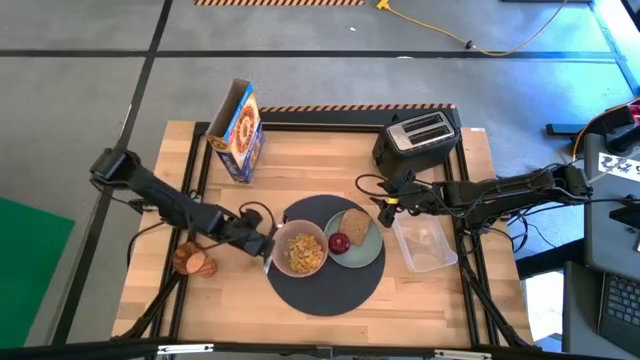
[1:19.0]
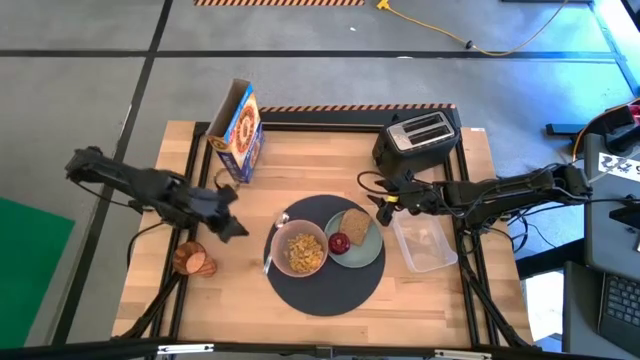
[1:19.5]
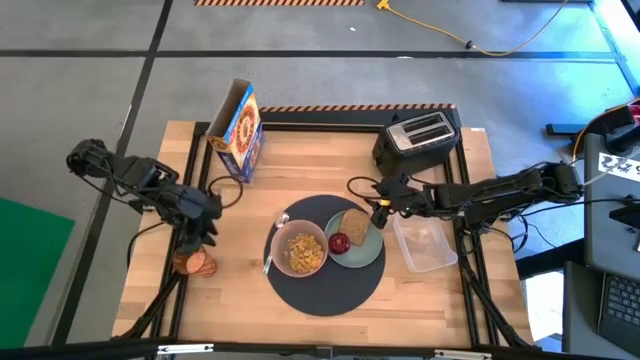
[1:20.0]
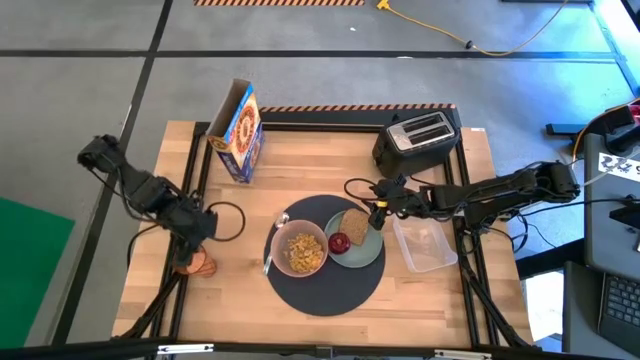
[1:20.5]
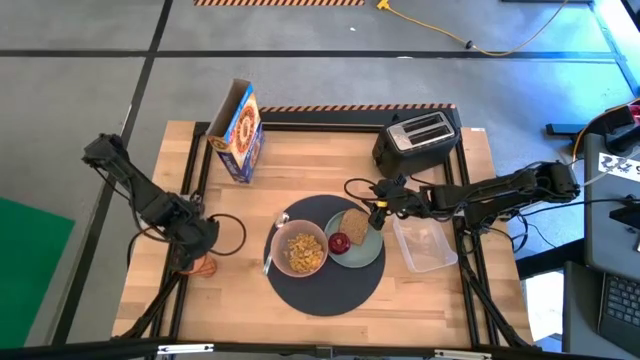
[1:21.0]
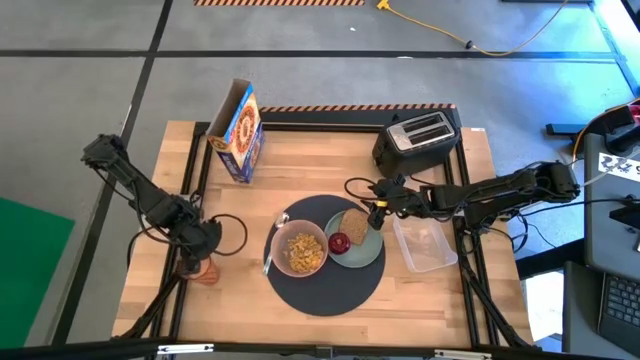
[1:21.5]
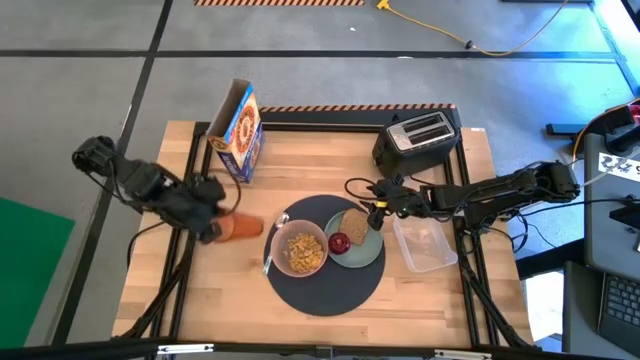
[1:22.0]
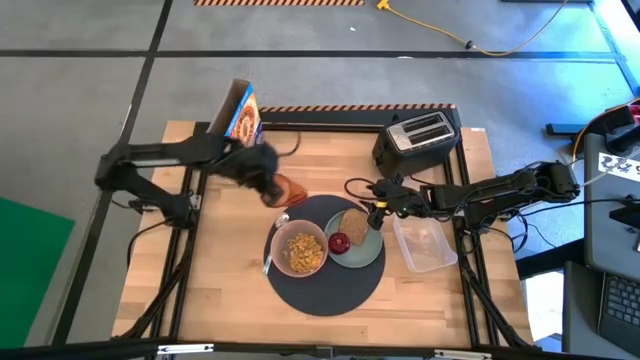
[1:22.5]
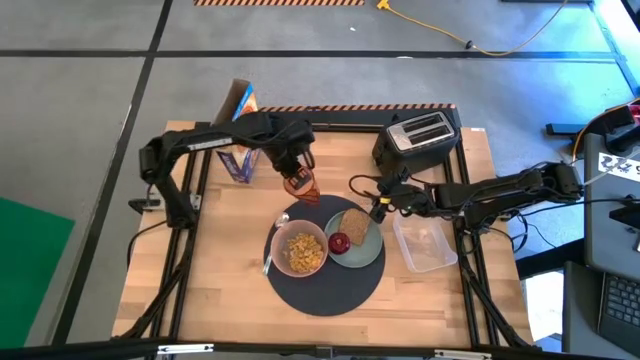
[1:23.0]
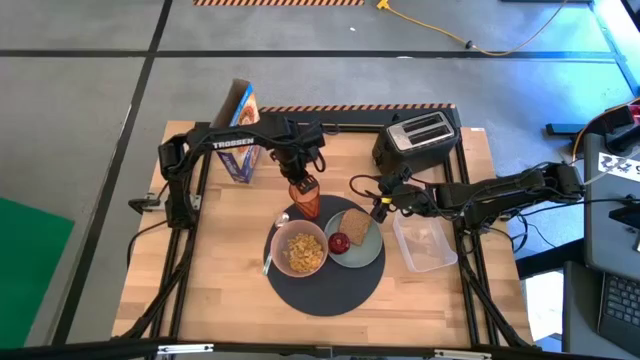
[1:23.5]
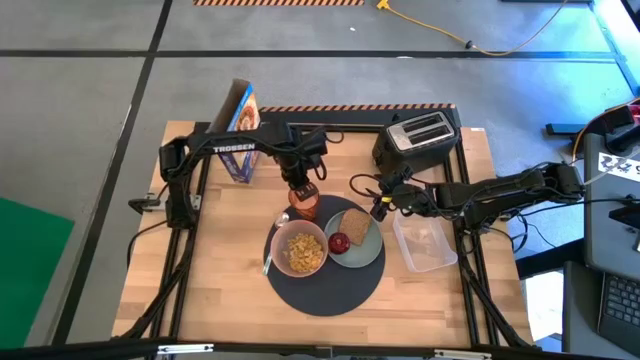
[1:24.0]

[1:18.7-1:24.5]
Task: Arrange a breakfast setting
Put the orange cup on the blue placemat to the top of the orange bowl

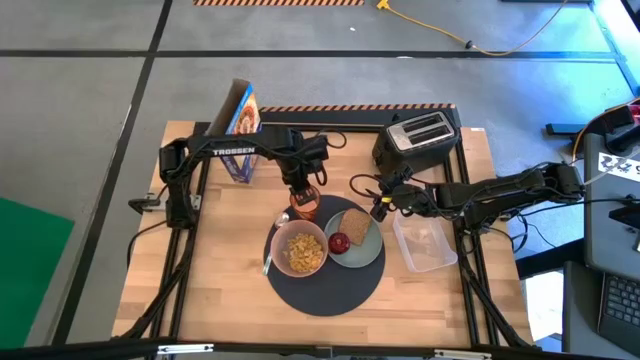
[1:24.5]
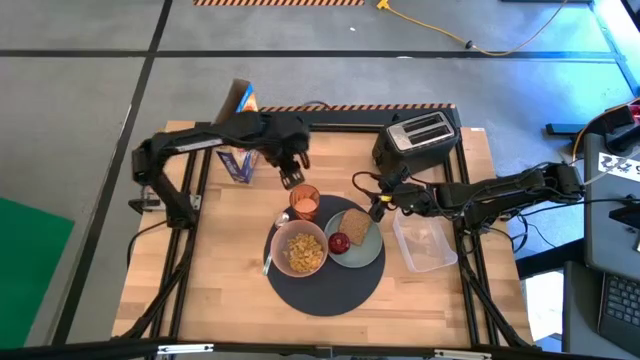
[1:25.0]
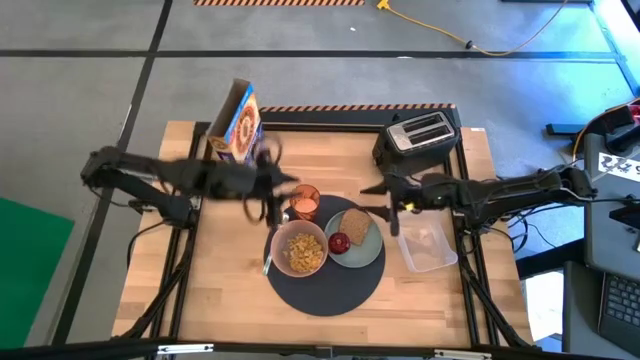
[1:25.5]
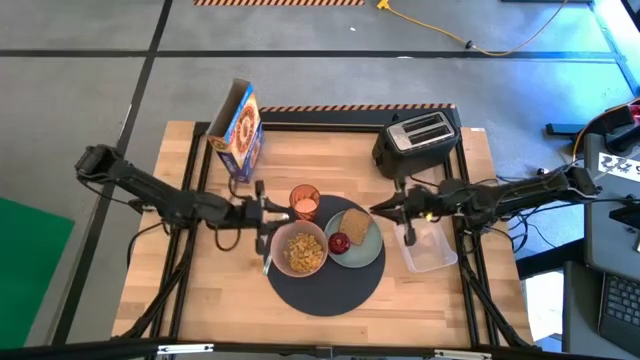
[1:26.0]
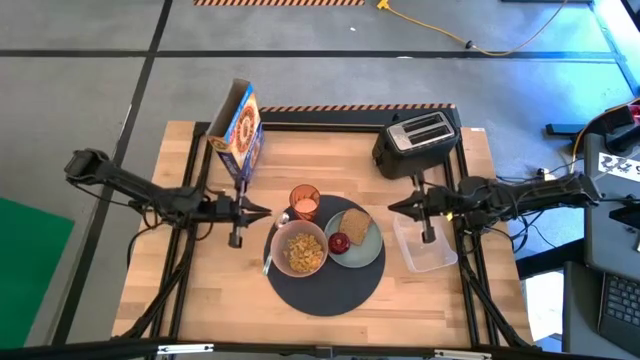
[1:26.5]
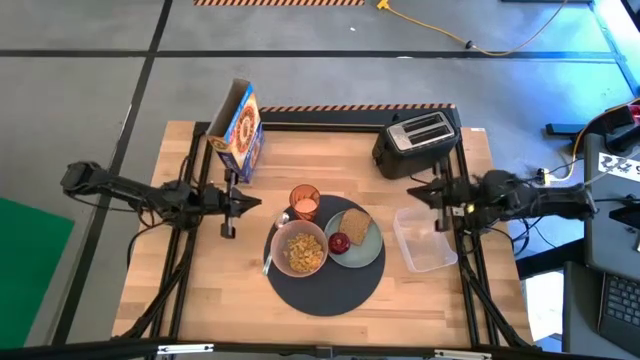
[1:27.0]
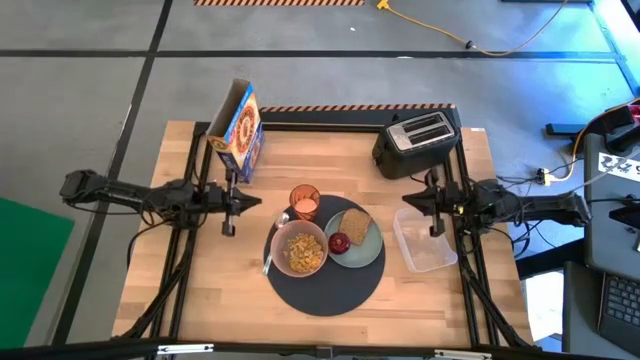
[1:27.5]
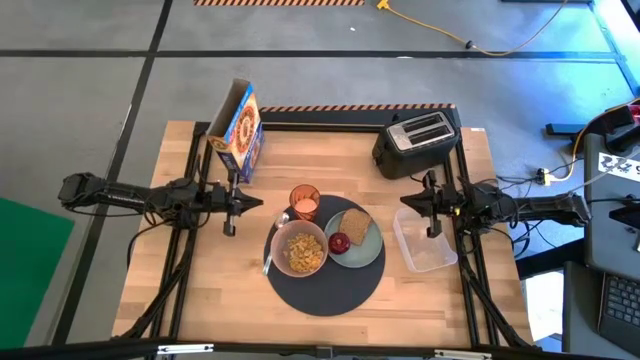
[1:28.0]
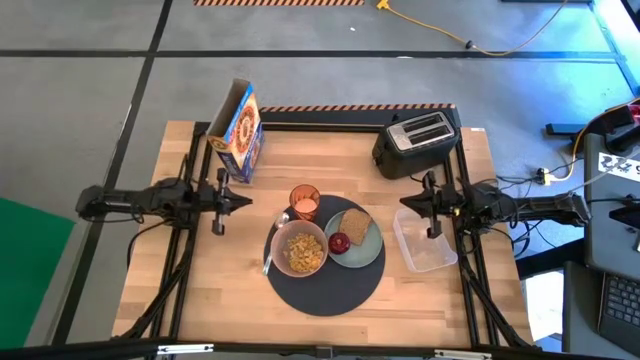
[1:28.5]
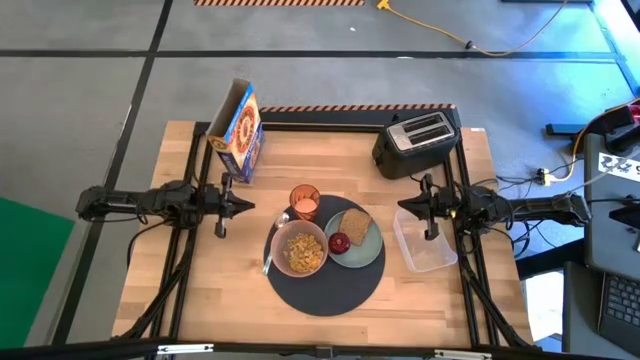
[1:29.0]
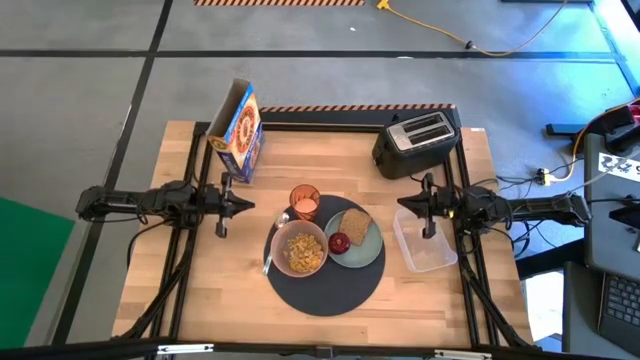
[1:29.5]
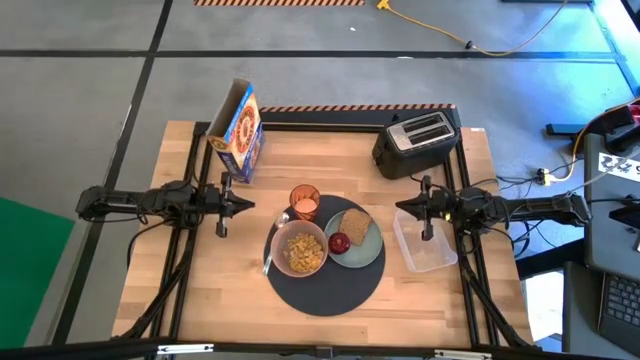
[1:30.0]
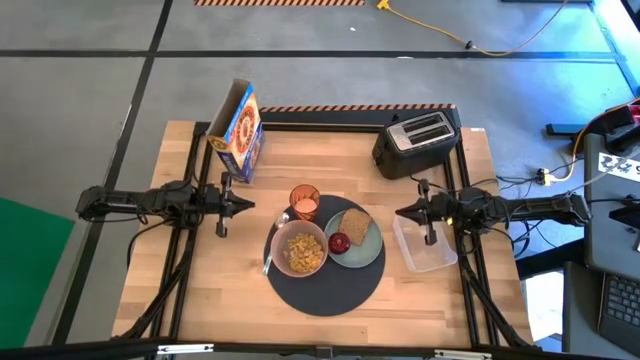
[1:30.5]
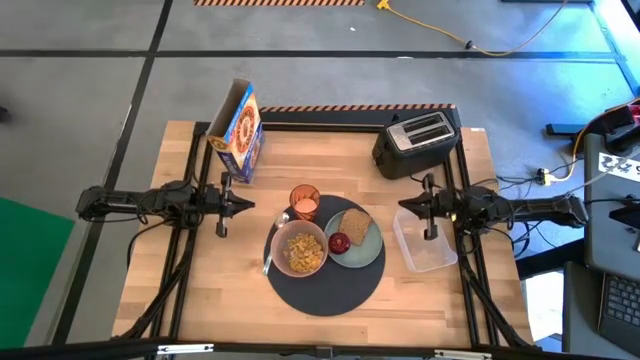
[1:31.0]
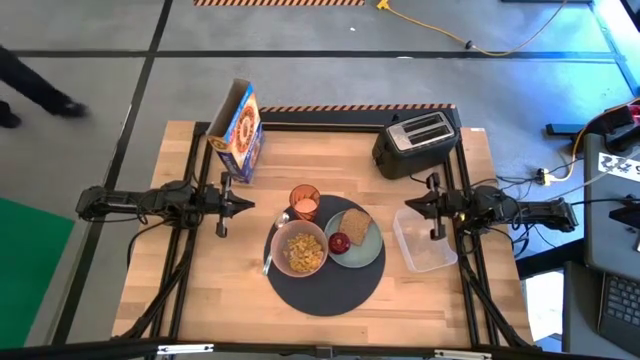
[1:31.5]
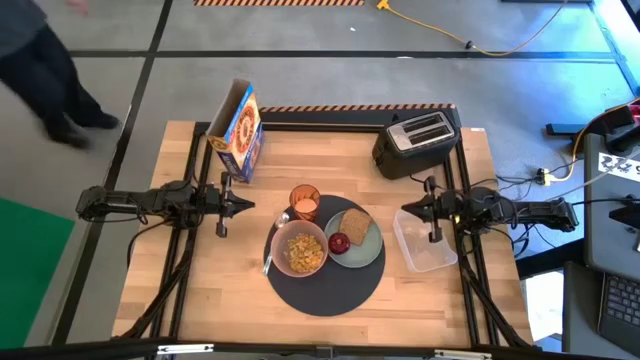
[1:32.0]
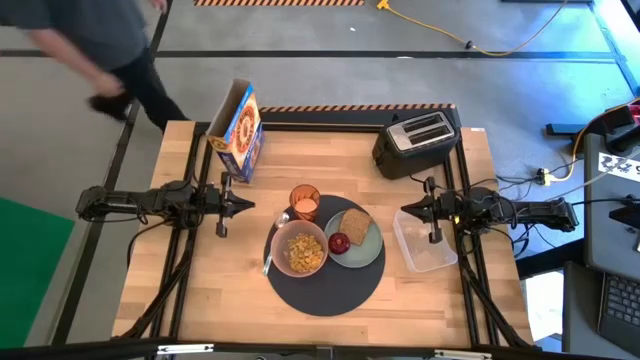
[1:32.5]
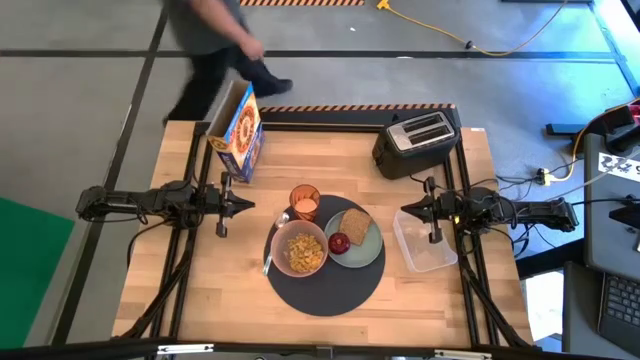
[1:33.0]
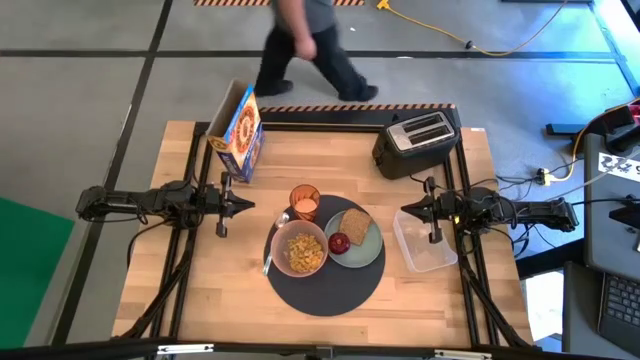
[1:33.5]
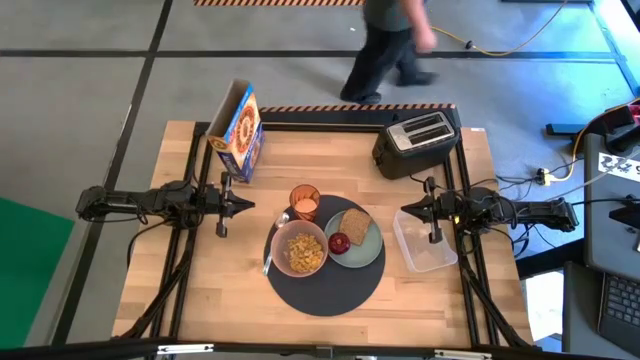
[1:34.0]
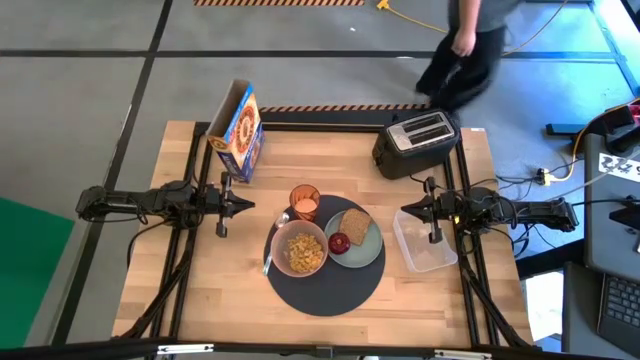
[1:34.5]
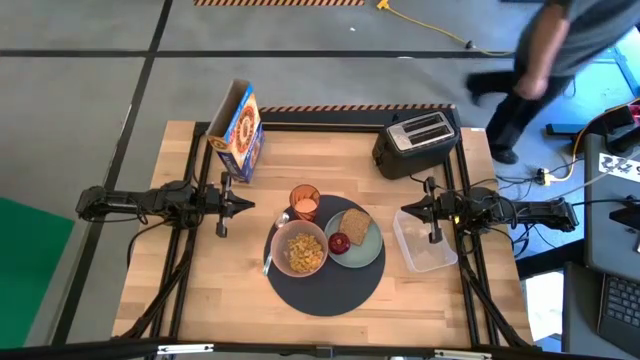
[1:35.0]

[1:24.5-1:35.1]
Return to Home Position

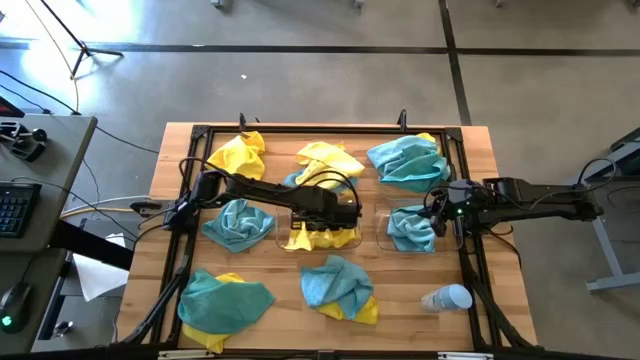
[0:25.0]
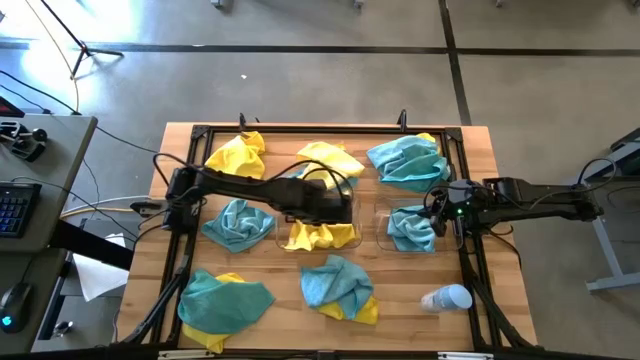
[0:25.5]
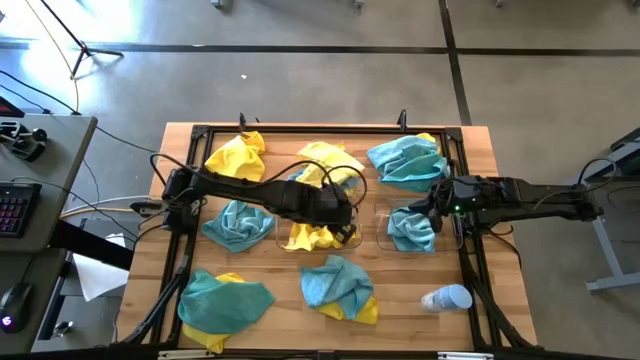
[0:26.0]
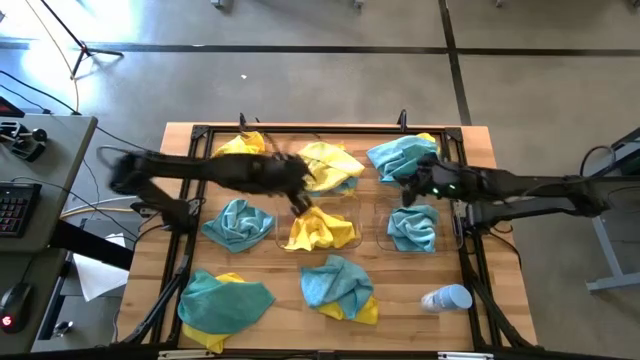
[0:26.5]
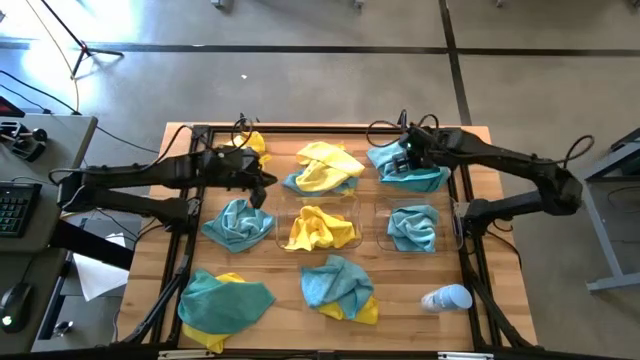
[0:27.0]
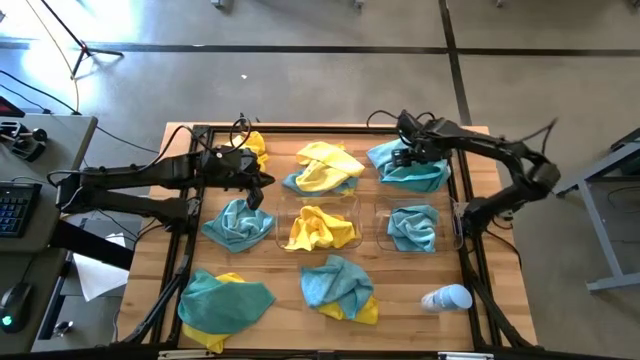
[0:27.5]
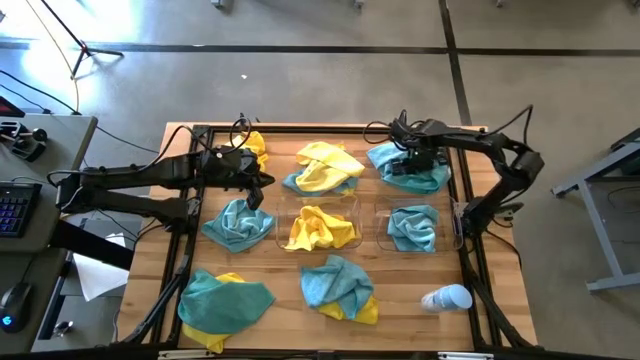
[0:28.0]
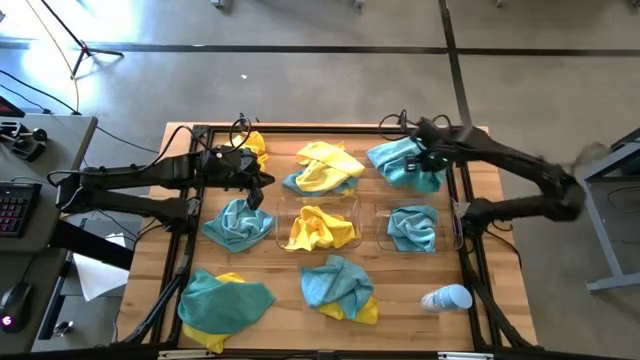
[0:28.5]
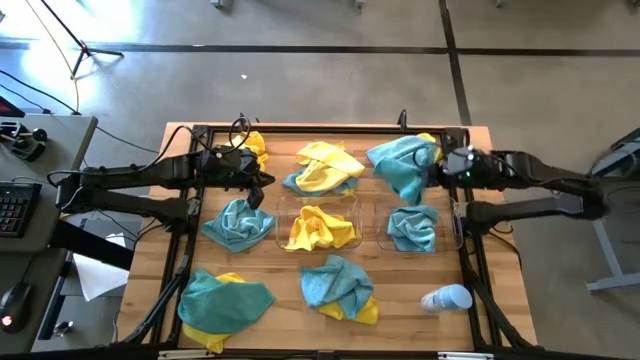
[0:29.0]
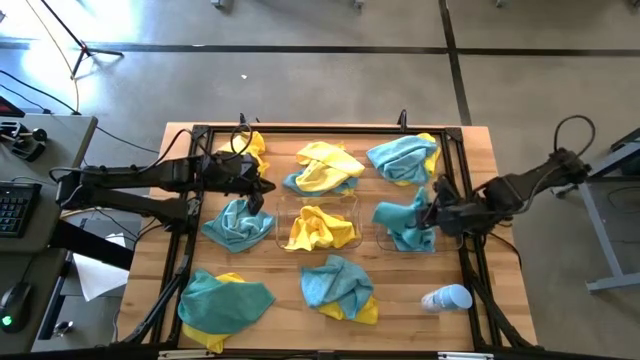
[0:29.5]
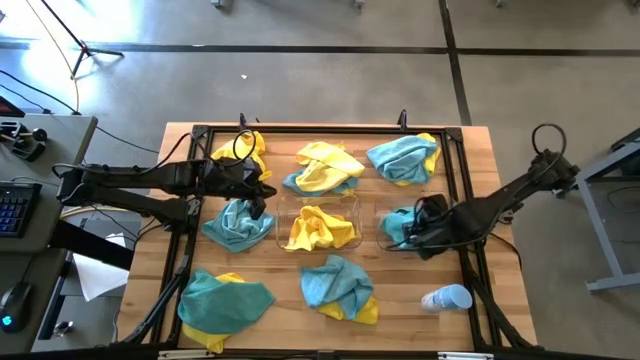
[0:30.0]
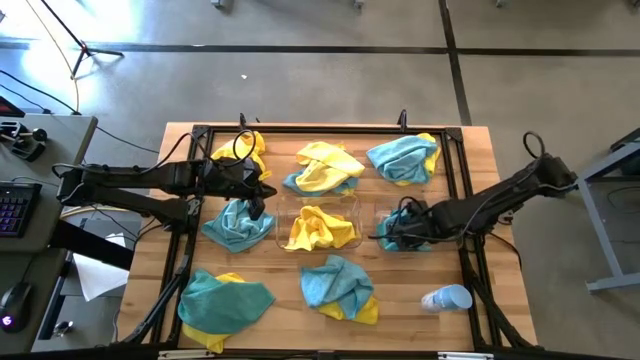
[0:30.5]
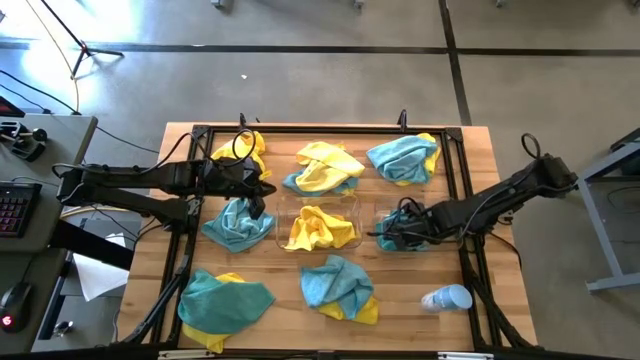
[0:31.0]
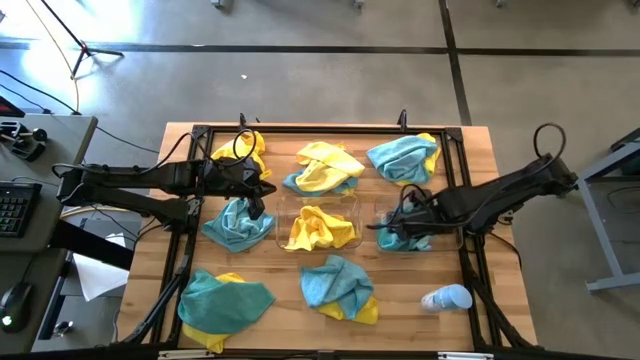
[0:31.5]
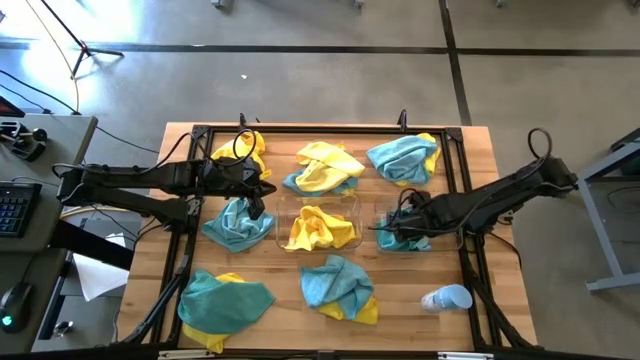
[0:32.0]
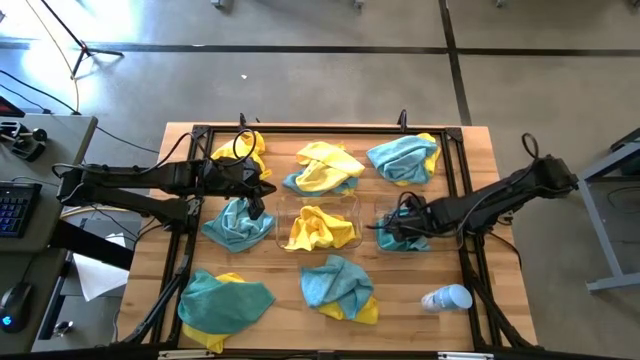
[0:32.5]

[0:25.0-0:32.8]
Task: Sort microfiber towel by color & place in baskets
Put the blue microfiber cloth into the right transparent bin
